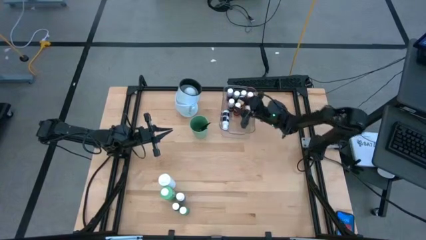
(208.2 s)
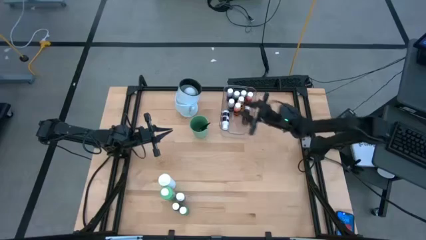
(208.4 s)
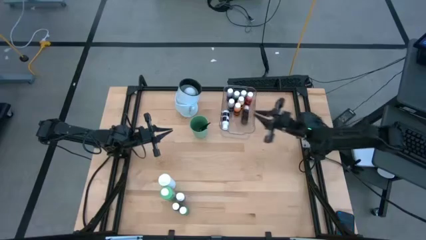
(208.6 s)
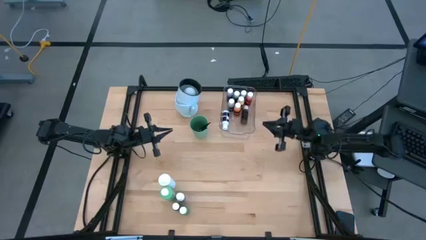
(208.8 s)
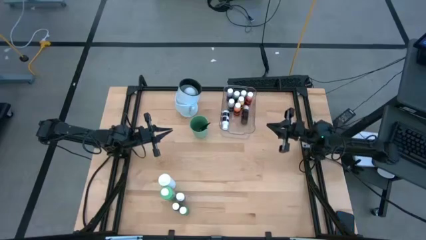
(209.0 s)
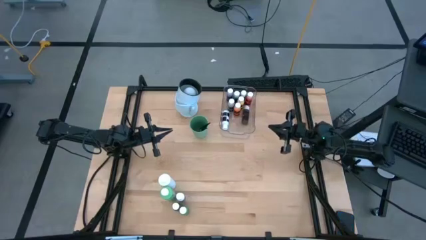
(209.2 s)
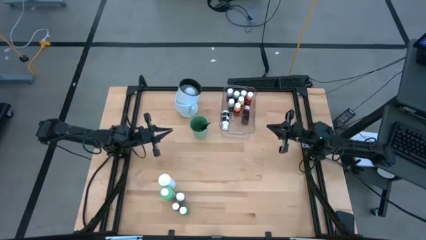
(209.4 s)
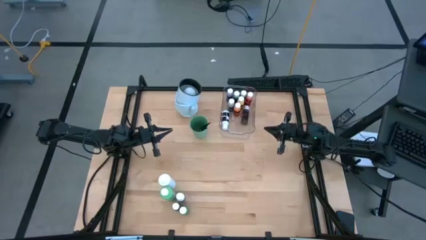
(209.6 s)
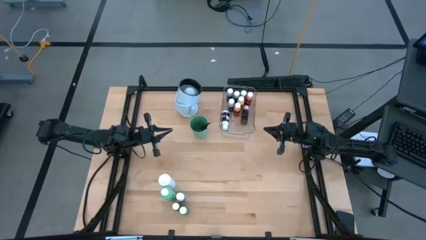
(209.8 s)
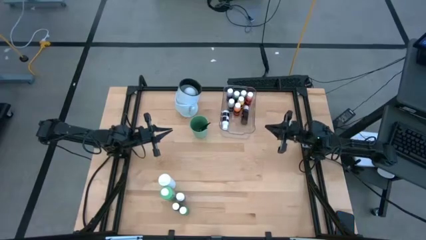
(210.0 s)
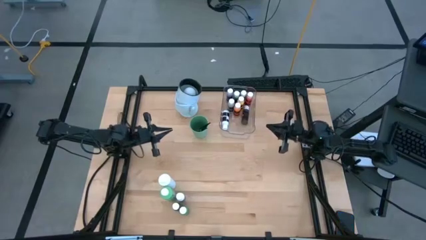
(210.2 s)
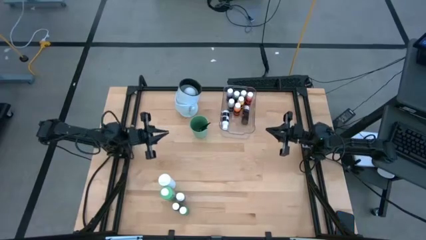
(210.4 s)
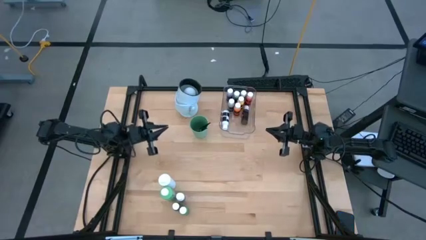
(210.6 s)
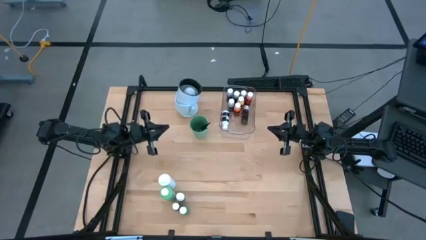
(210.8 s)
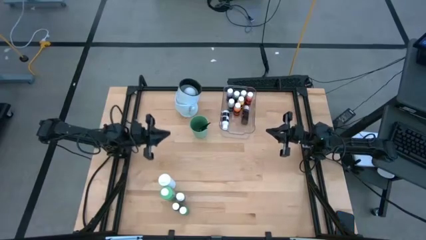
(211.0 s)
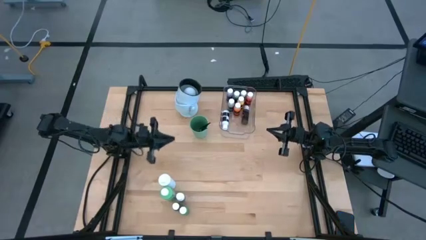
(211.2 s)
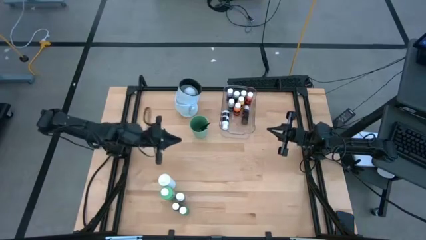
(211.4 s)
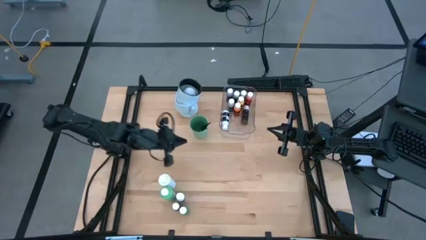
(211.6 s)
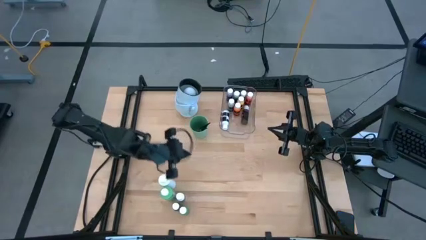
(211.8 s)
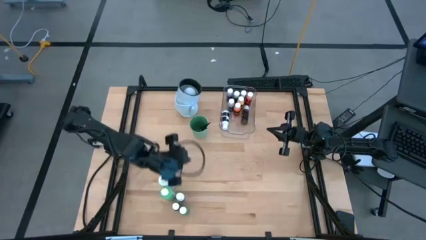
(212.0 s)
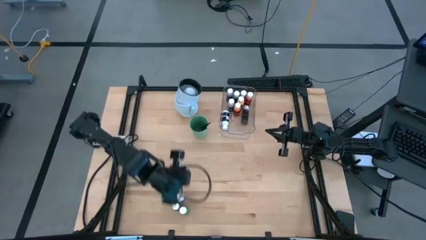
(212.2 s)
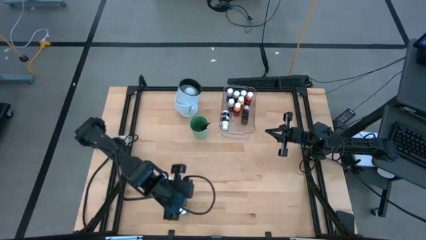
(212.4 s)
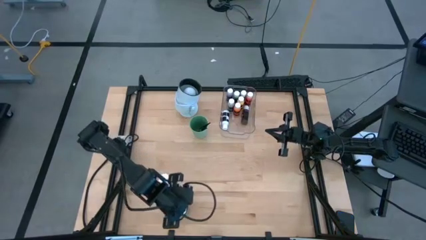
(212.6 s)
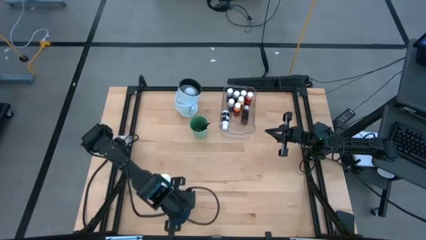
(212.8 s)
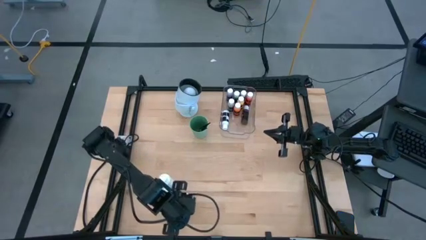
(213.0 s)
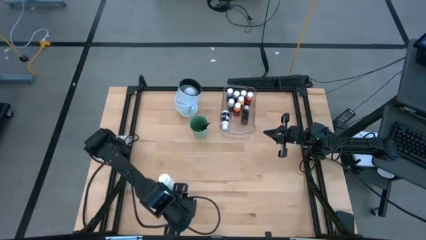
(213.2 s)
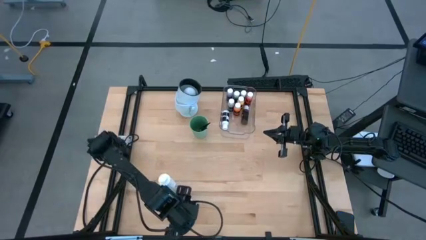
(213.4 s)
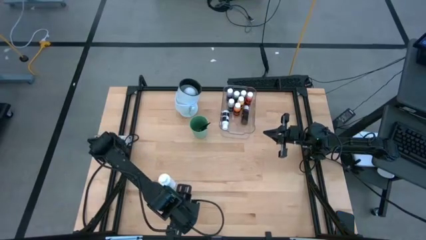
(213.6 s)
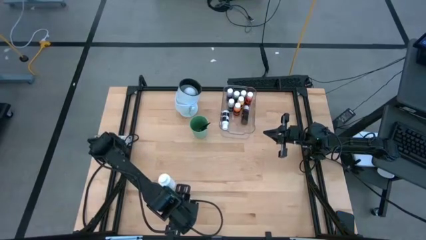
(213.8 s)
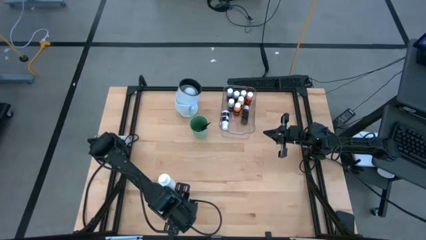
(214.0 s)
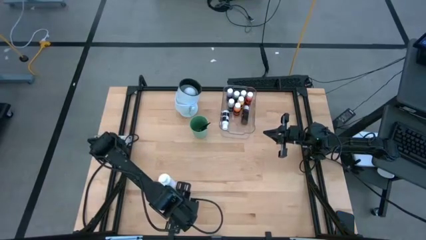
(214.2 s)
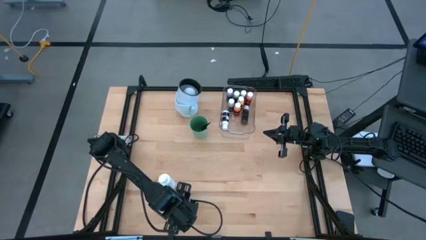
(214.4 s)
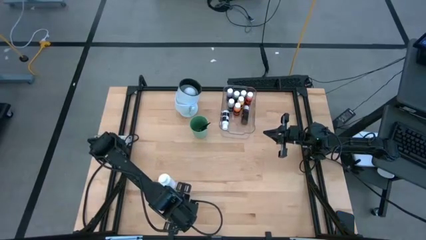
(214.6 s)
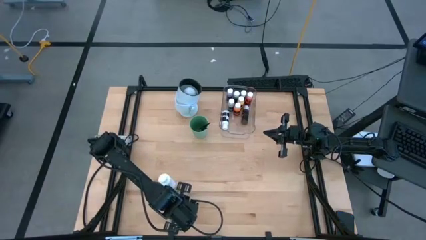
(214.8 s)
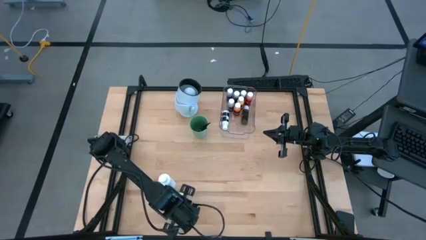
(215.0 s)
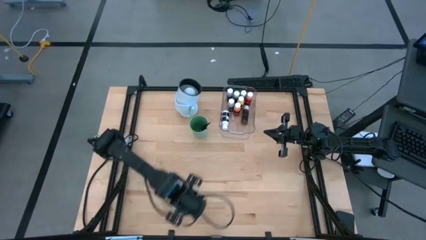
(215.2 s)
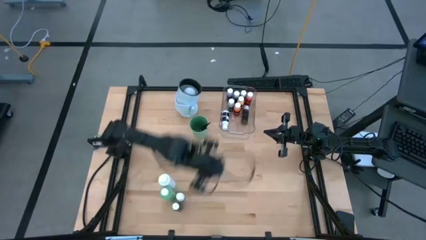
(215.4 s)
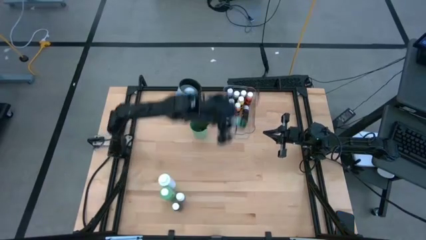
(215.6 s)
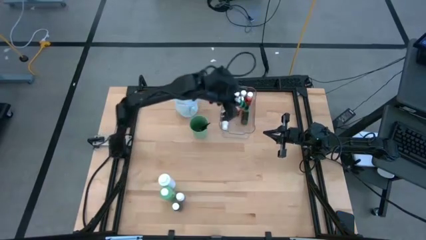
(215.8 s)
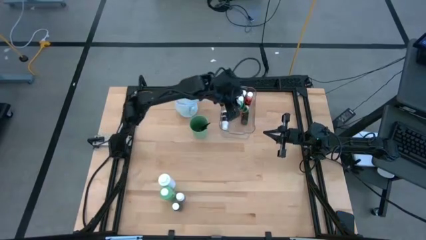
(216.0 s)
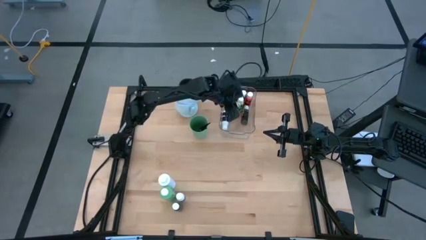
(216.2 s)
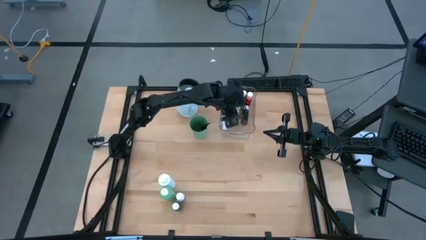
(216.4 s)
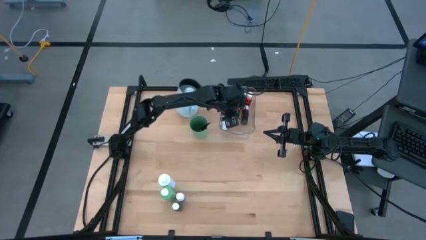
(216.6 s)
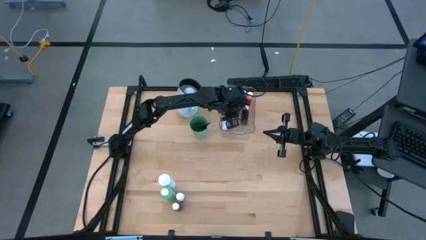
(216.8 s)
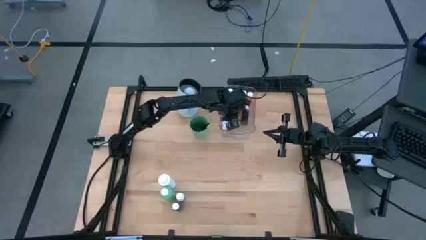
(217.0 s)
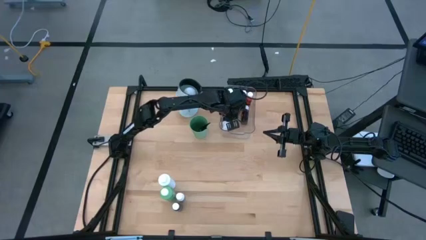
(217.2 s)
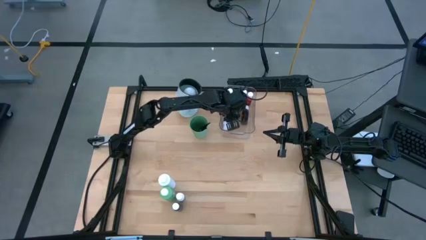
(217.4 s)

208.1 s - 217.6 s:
Task: Pick & Place Paint Supplies
Put the green paint bottle into the transparent bin
